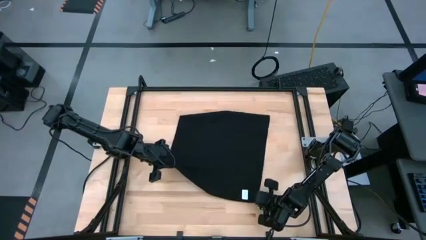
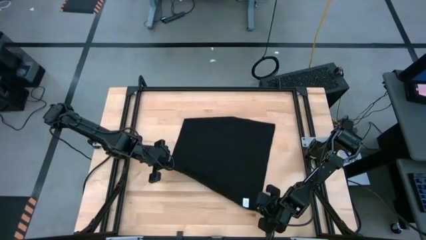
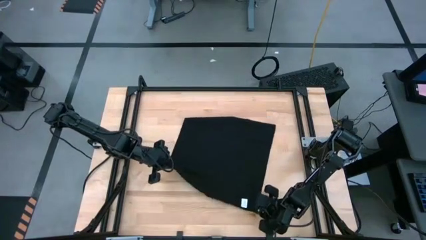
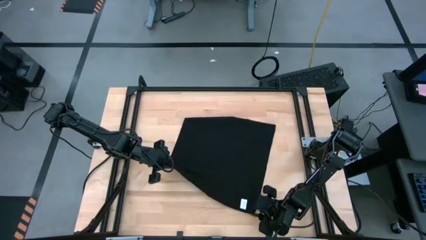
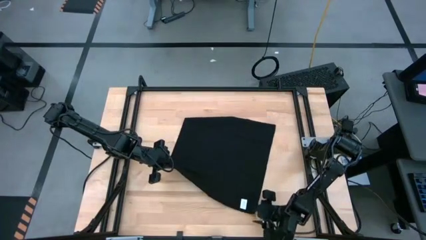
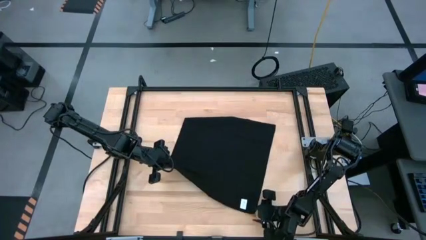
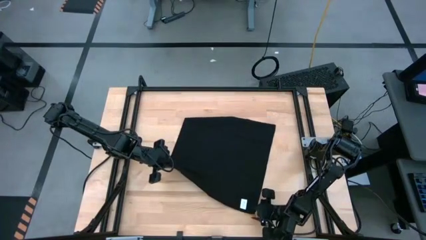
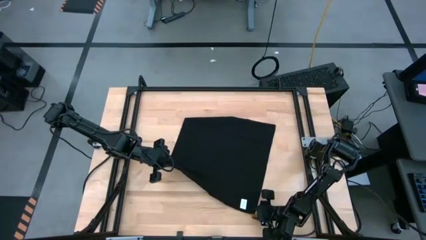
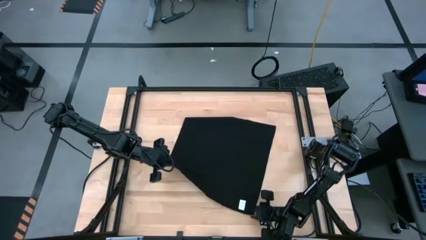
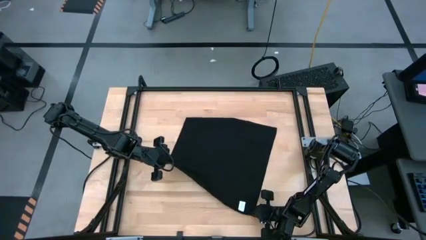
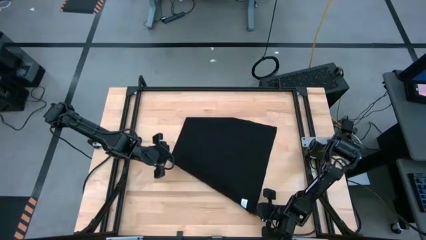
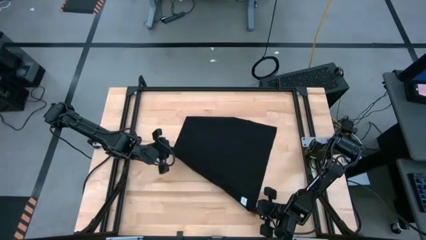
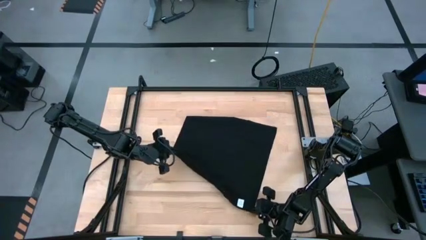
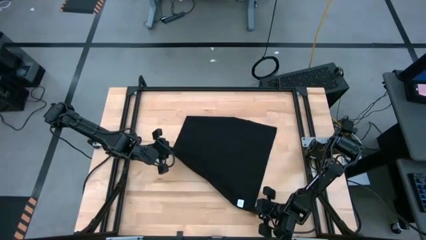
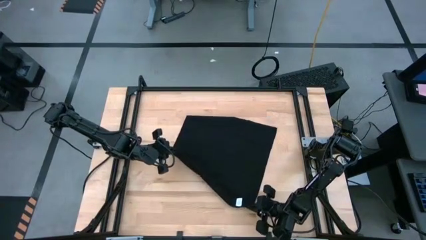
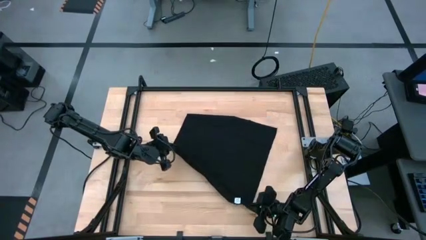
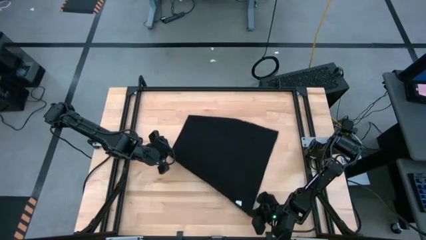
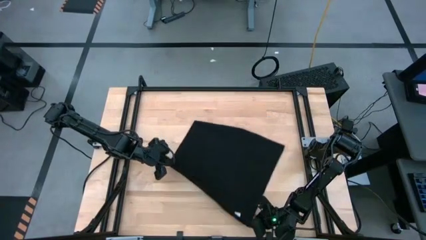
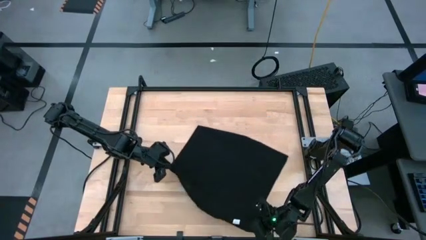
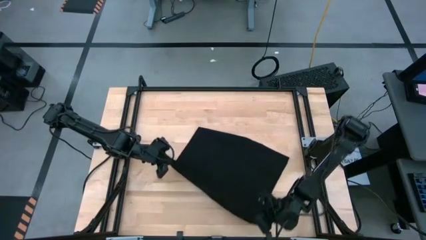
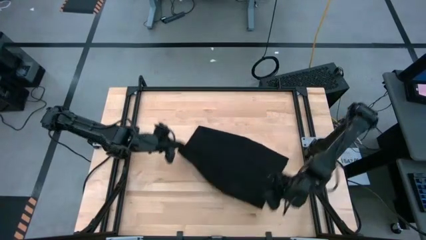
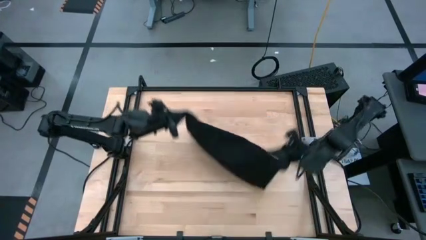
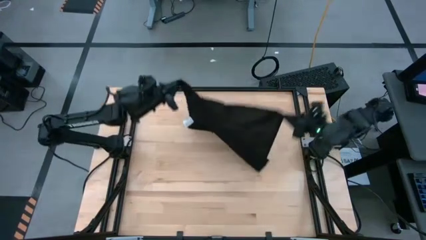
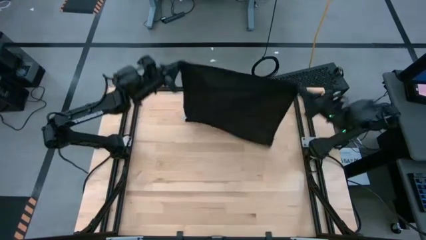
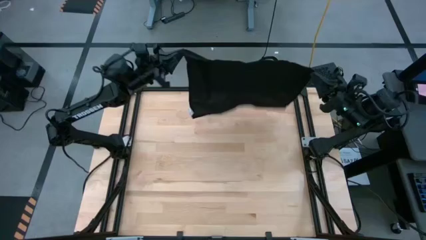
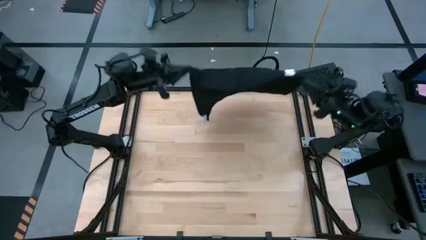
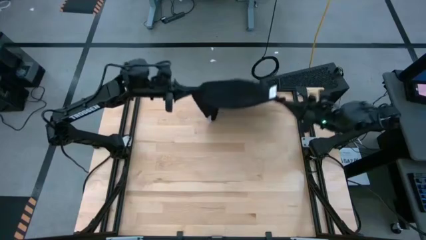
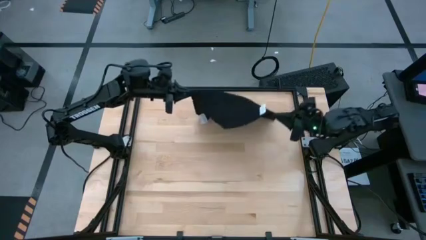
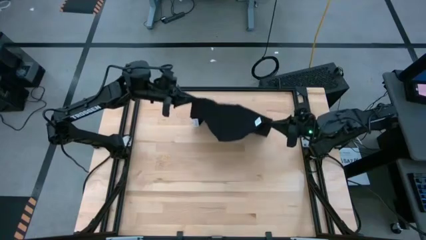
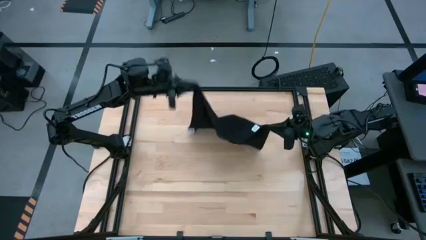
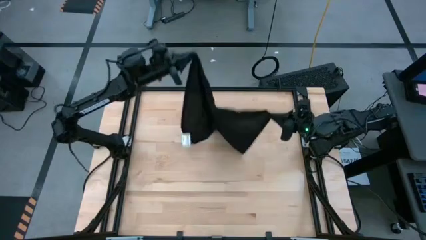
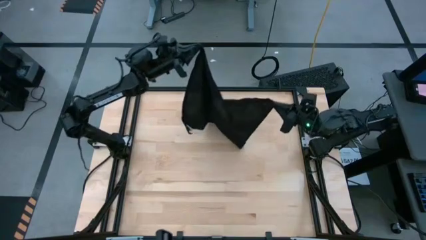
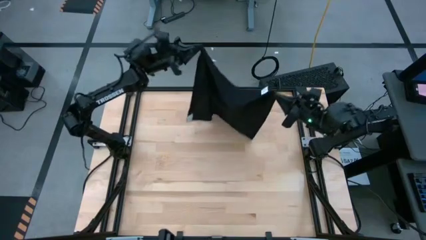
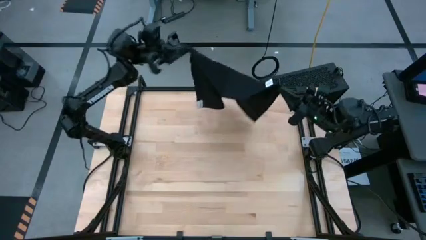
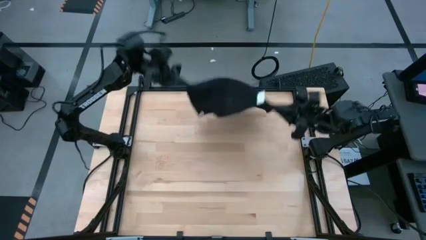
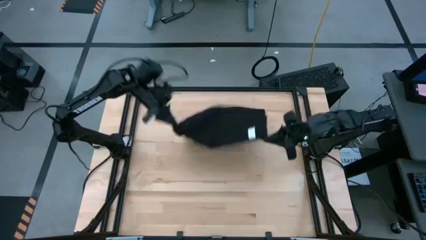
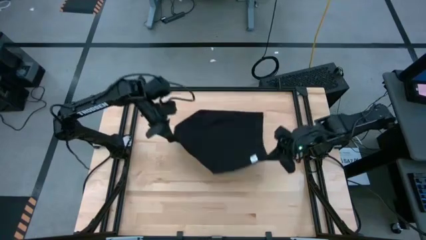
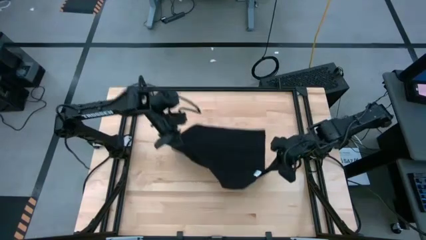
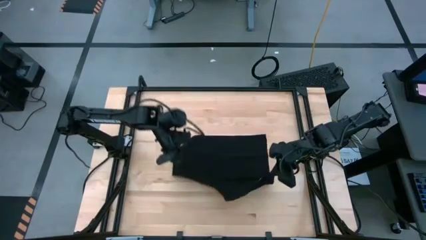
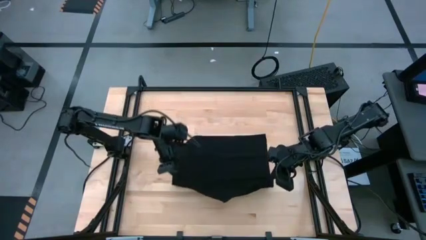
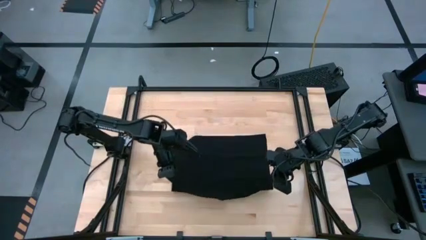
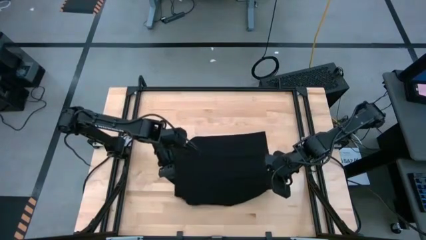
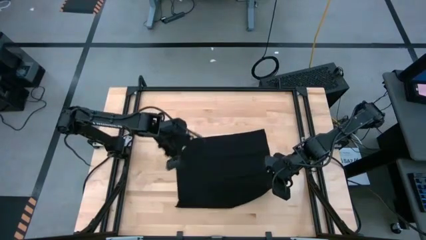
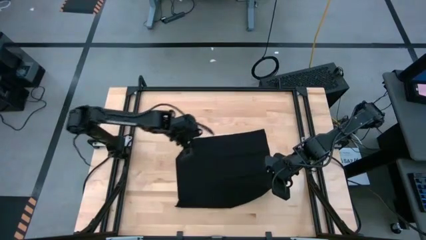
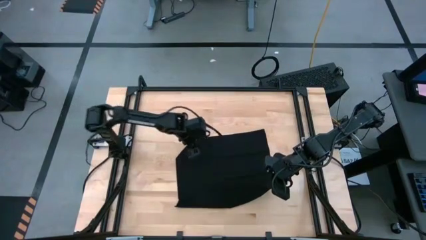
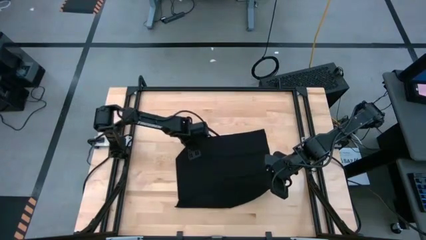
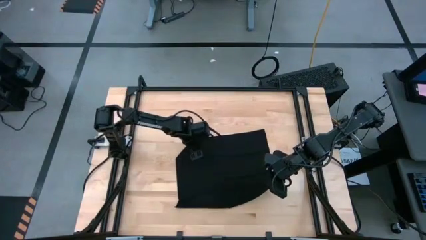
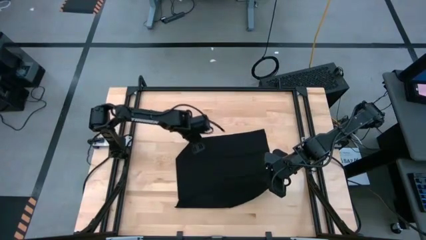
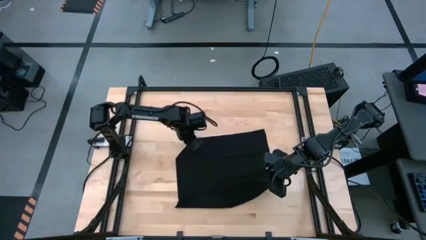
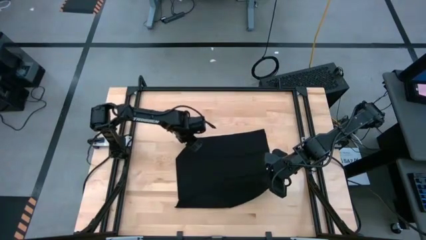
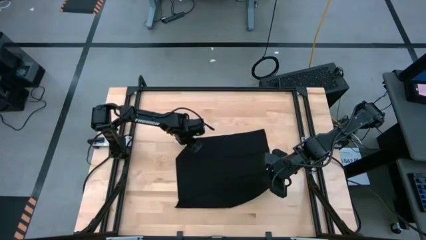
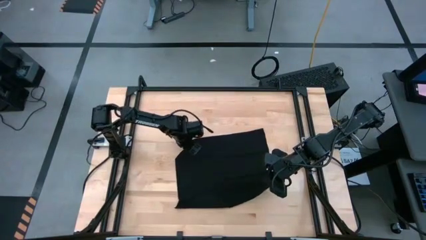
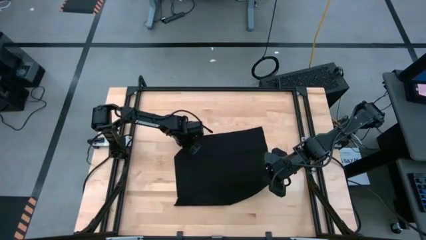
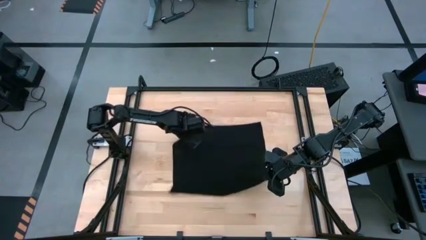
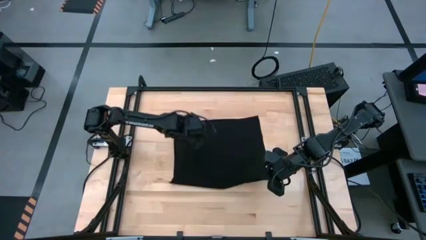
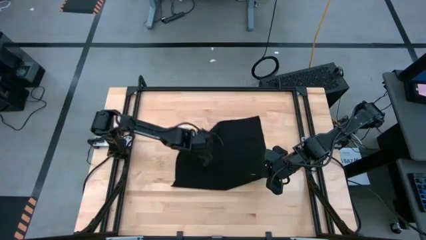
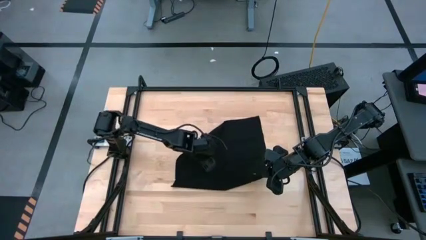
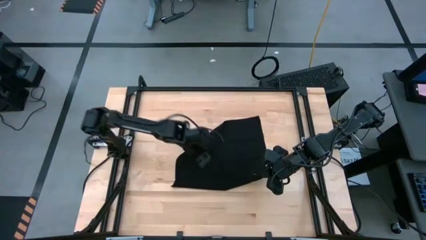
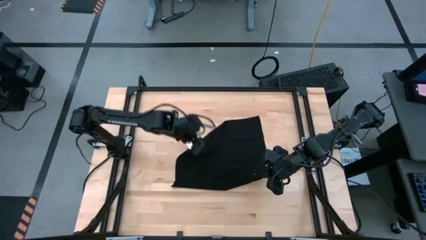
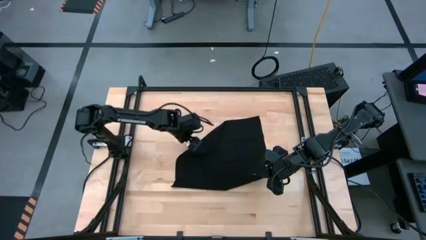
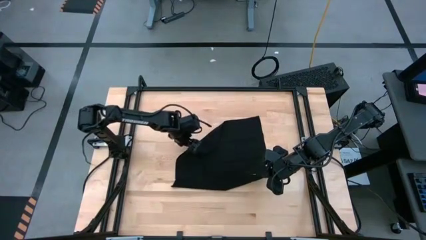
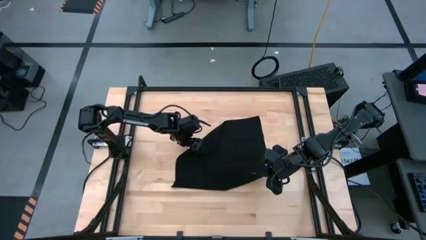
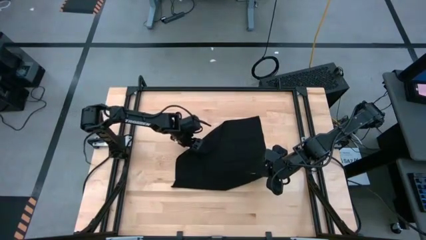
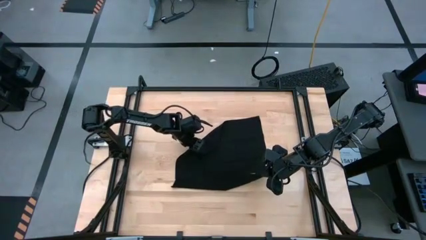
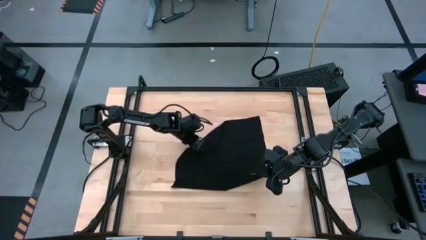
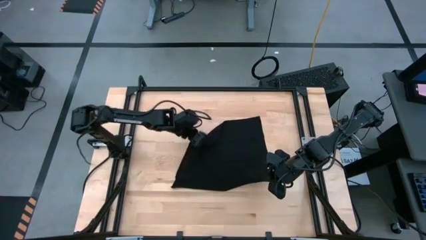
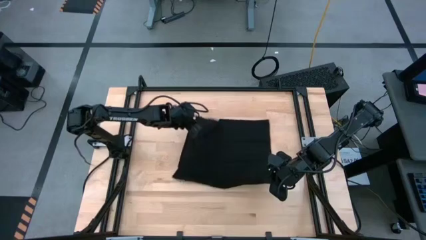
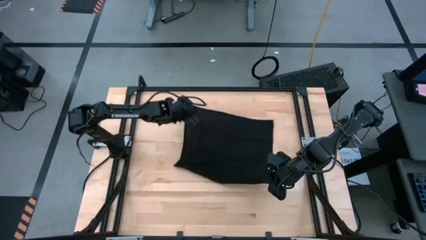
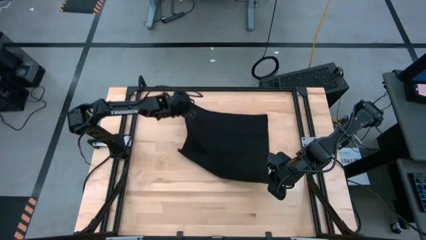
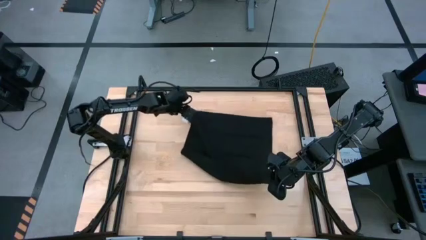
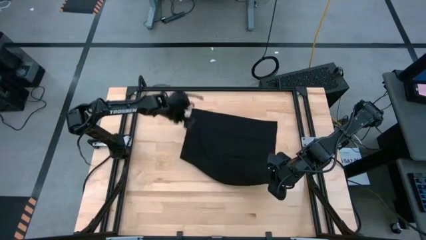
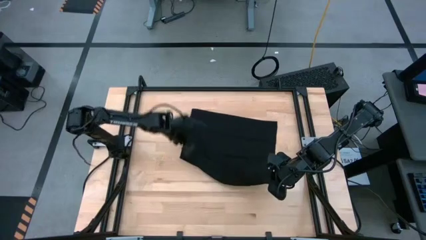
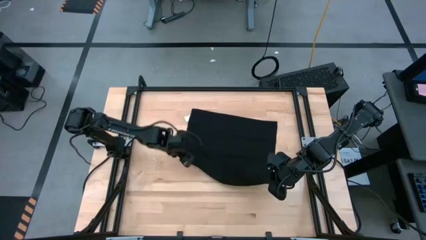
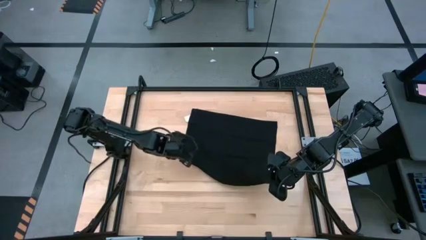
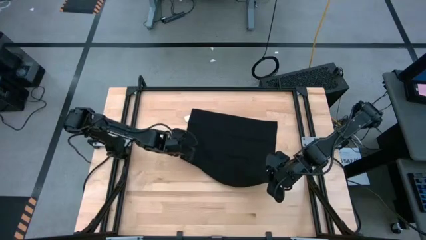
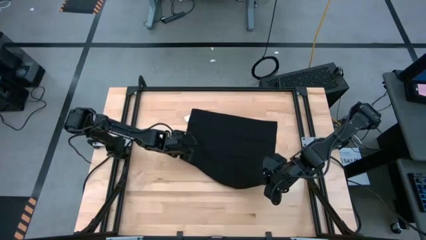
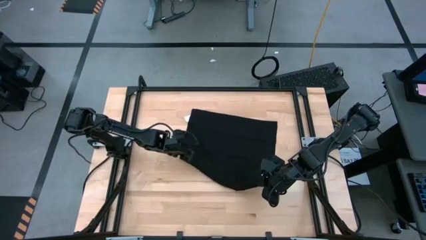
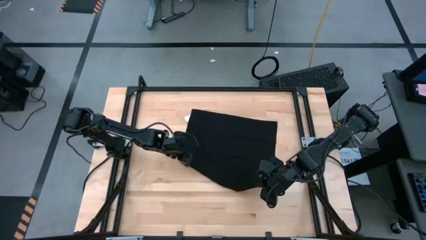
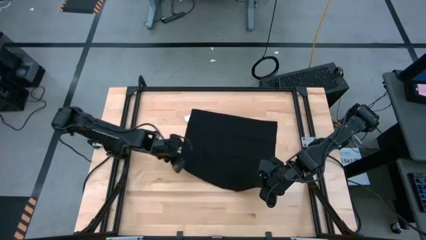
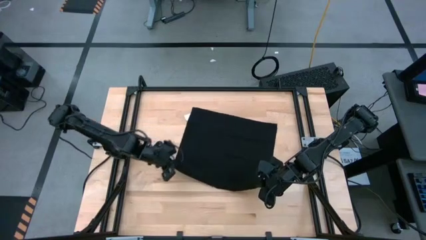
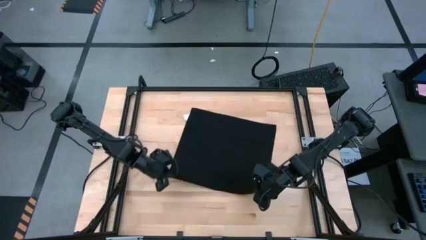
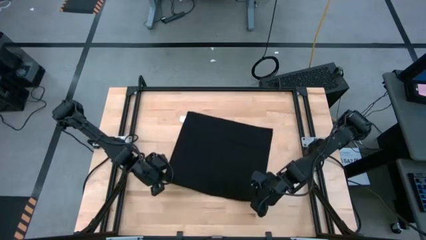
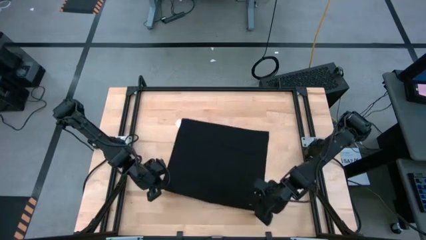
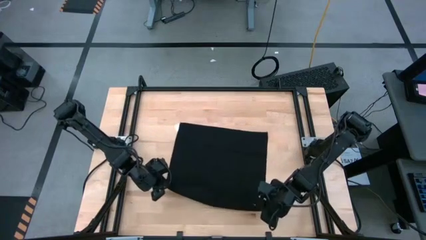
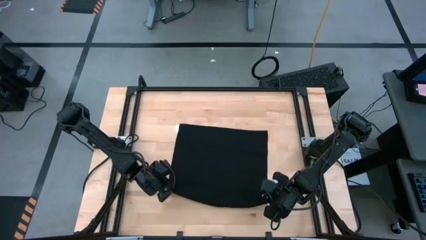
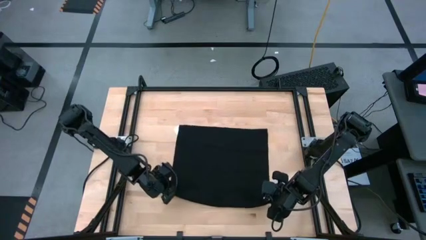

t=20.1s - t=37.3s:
Task: Roll napkin
Fold the black napkin
